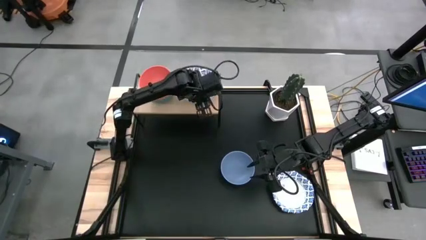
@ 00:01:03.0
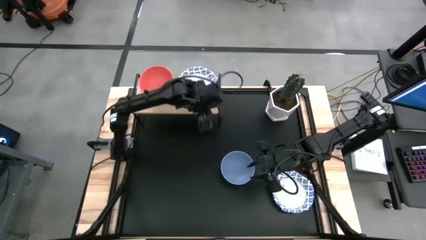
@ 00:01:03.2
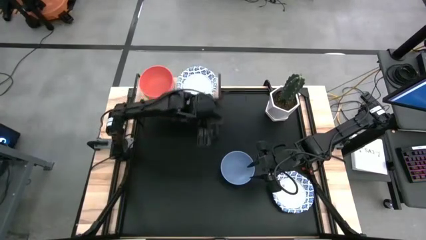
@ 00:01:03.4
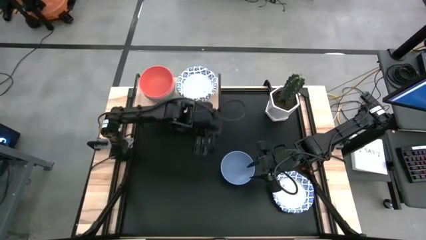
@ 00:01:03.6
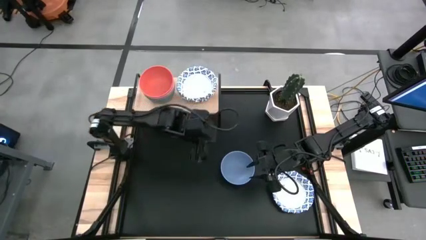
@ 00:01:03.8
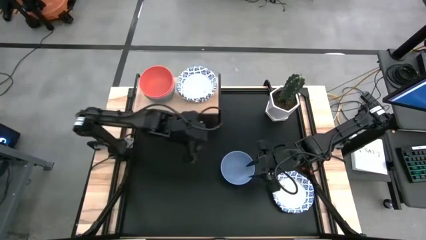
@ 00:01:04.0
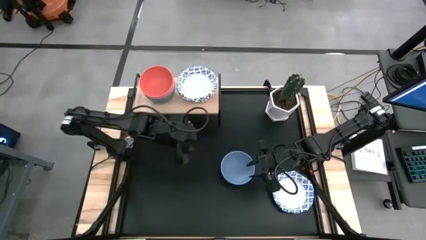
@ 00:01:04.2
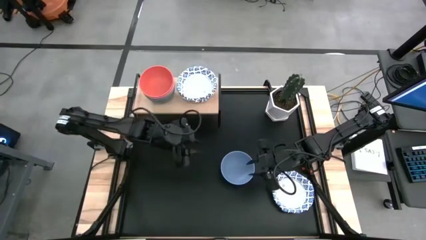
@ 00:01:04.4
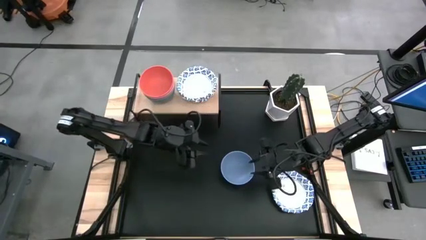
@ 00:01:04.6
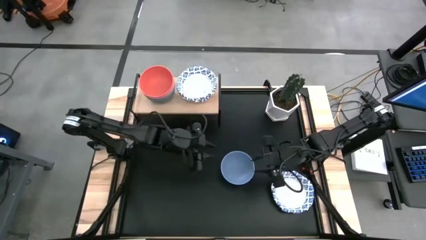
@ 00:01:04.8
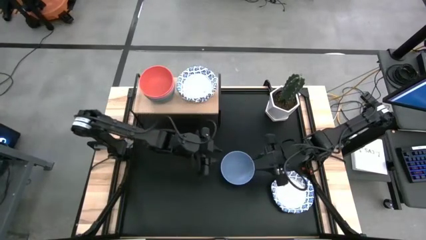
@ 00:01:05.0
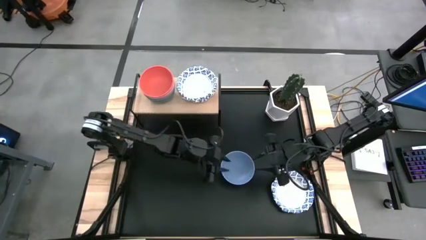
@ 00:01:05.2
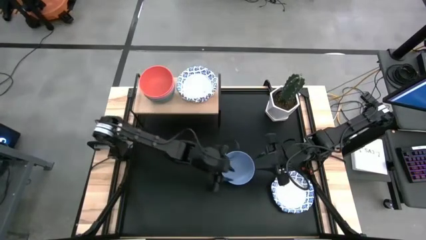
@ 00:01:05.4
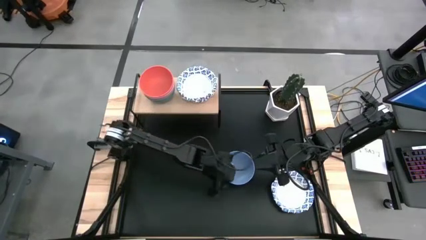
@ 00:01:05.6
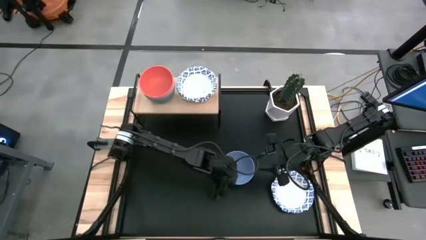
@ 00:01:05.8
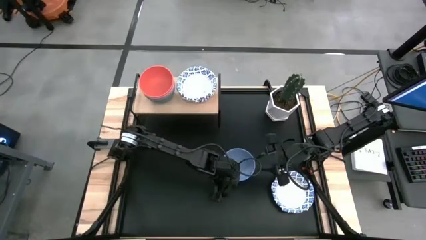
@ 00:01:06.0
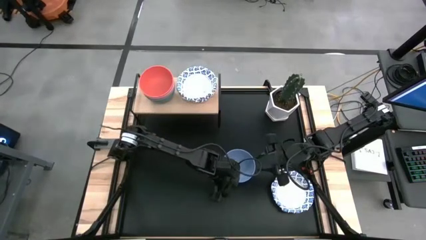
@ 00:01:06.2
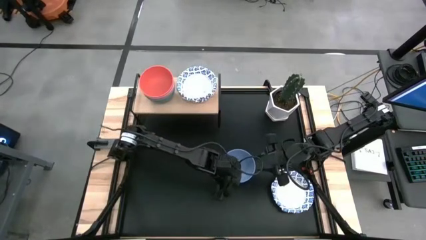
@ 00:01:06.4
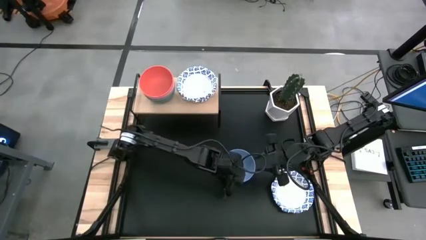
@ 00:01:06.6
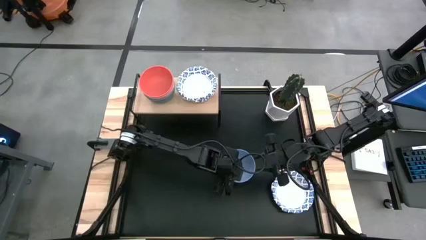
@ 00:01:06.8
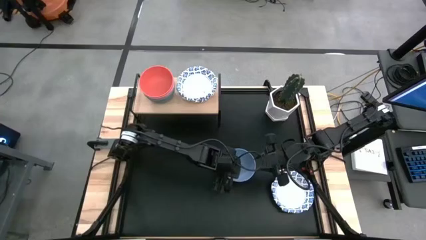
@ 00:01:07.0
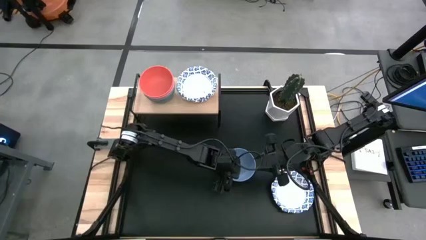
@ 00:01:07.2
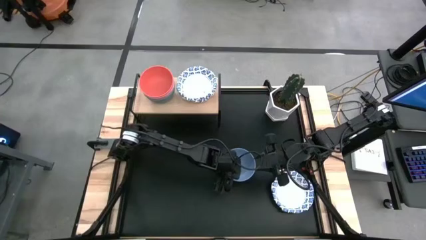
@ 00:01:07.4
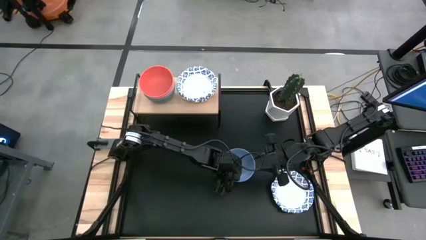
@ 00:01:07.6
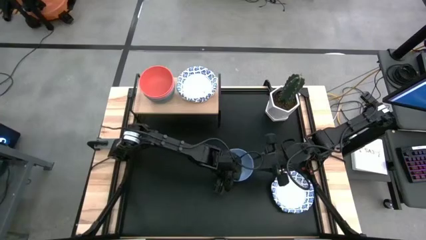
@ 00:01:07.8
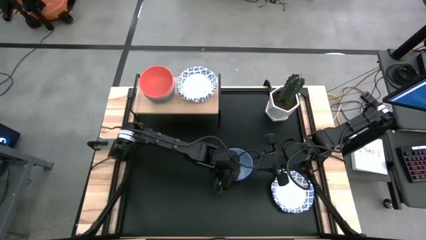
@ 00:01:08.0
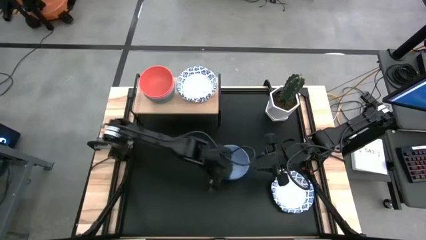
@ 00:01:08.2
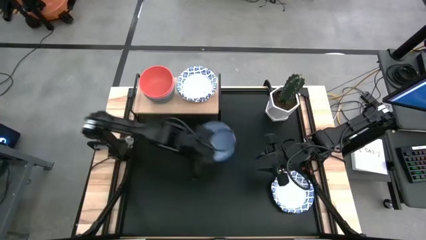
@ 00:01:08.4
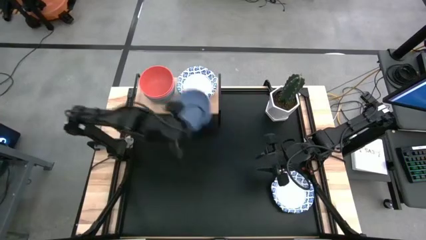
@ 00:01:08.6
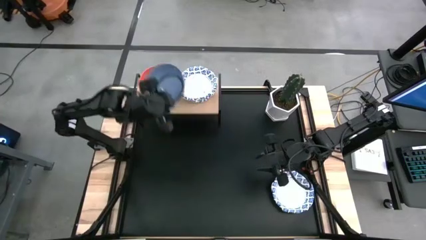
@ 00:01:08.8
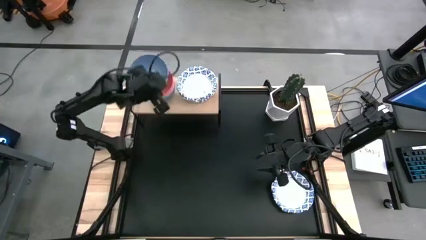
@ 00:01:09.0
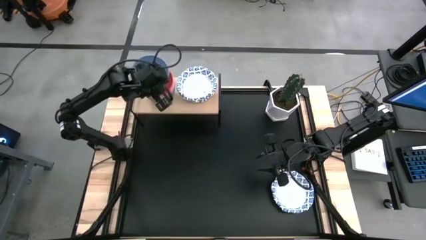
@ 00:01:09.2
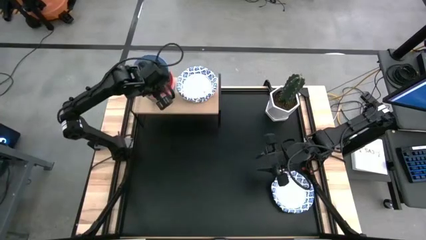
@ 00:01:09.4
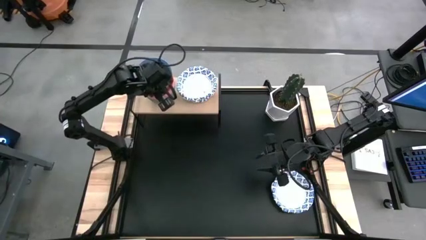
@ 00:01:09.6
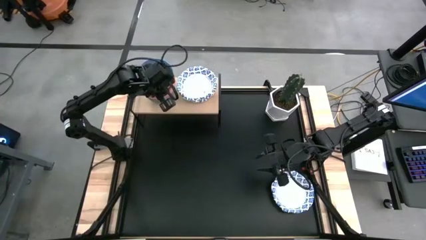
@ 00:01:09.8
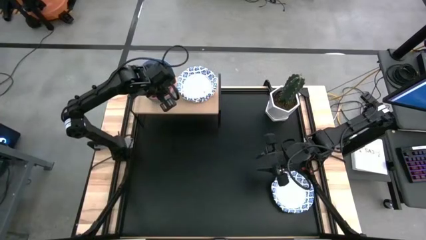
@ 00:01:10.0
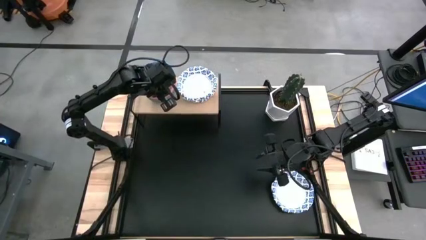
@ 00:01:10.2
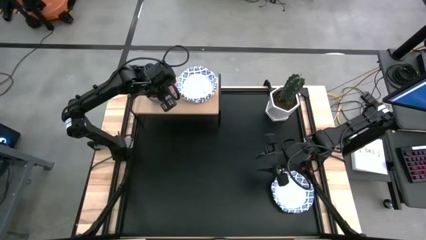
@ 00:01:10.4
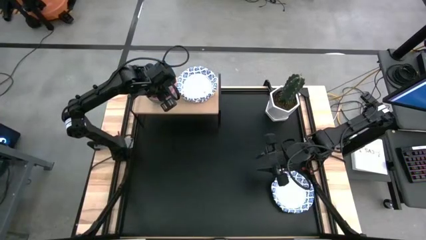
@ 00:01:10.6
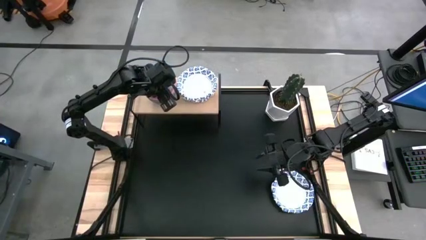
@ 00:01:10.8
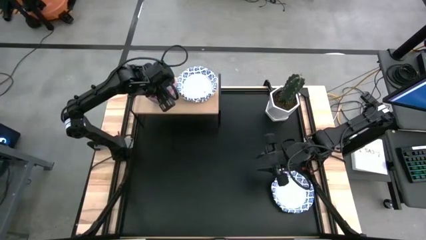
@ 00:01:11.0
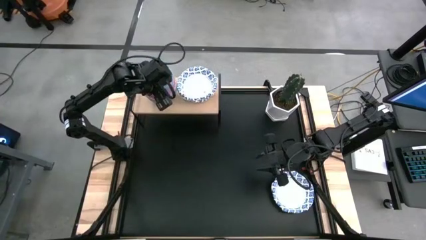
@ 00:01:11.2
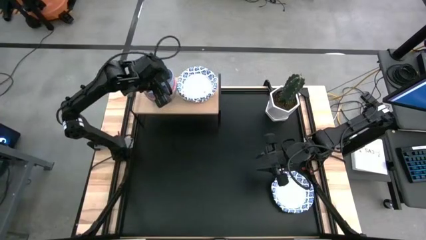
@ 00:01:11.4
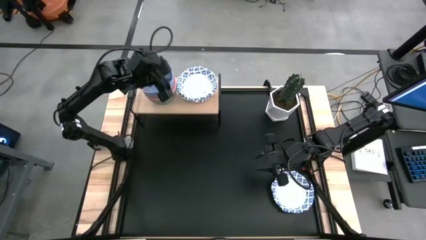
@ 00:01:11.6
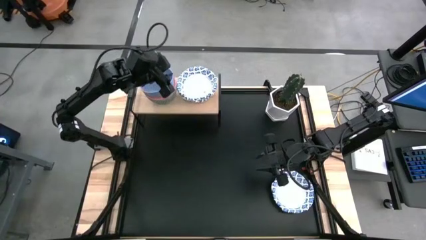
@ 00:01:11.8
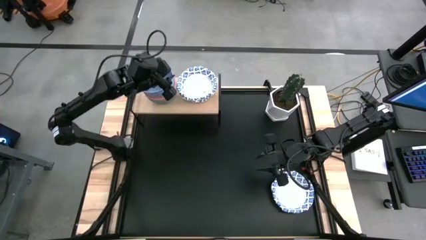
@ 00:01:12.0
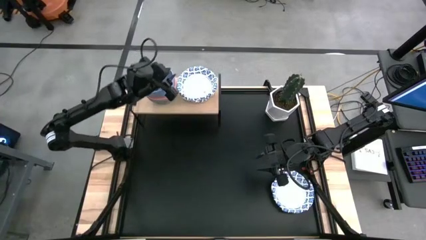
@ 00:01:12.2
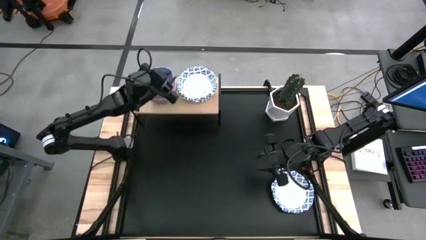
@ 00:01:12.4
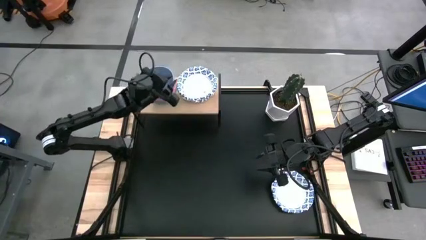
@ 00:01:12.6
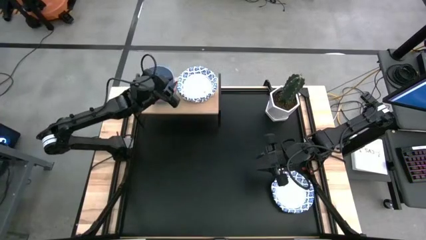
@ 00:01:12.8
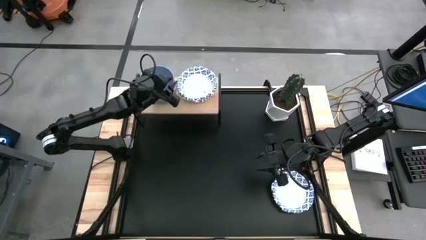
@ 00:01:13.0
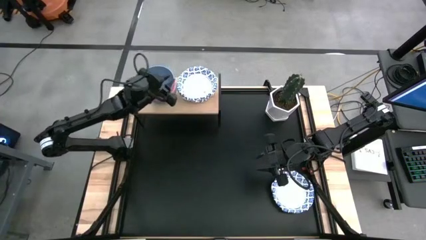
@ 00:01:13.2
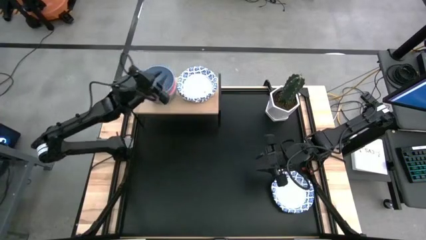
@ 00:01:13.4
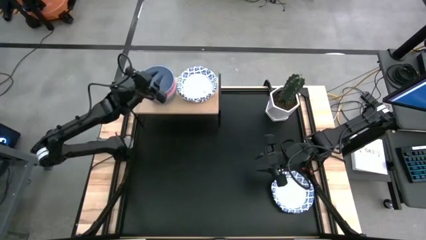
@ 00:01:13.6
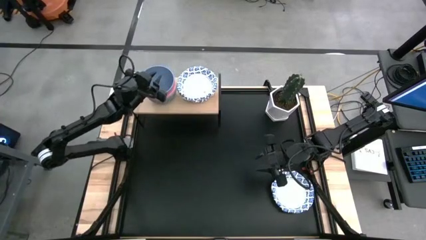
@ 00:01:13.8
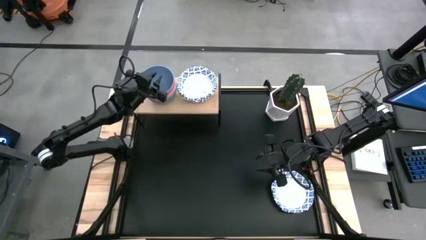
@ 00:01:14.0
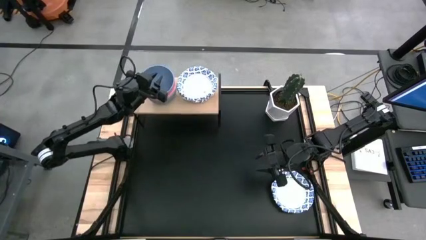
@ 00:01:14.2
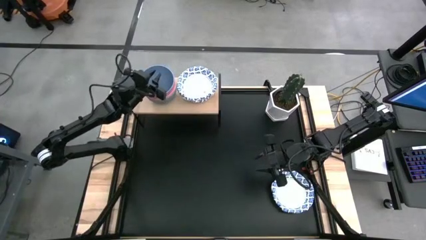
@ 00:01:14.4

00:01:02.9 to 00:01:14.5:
Task: Place and stack bowls onto a shelf
Stack the light blue bowl on top of the orange bowl on the shelf

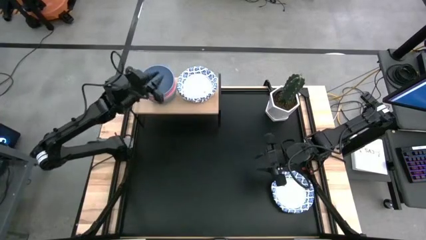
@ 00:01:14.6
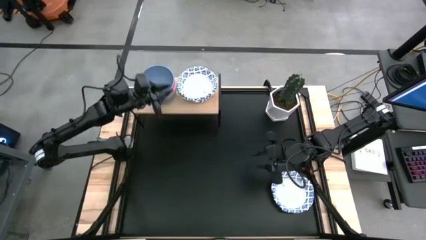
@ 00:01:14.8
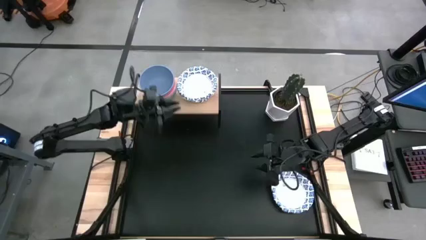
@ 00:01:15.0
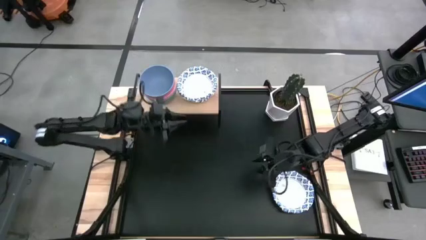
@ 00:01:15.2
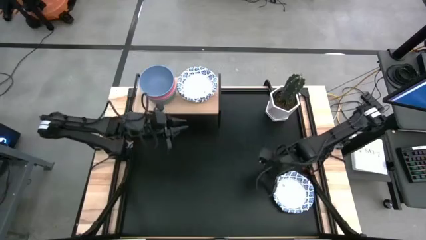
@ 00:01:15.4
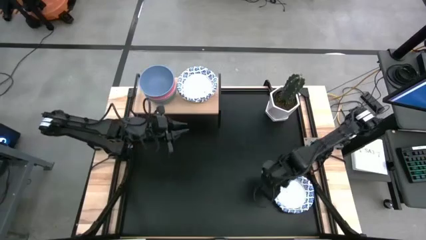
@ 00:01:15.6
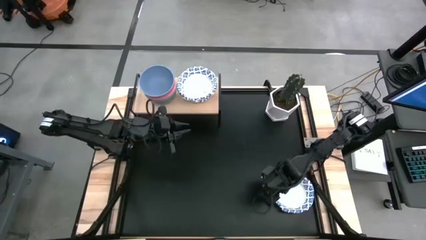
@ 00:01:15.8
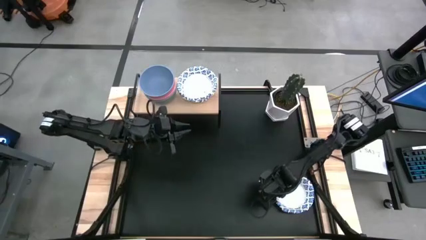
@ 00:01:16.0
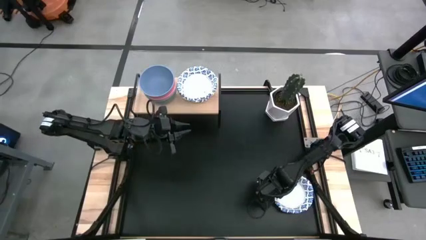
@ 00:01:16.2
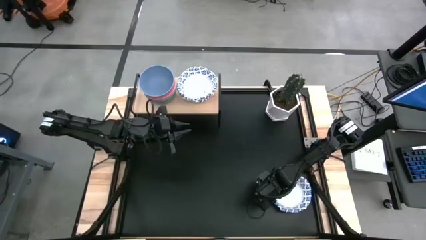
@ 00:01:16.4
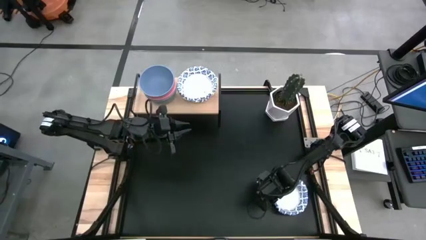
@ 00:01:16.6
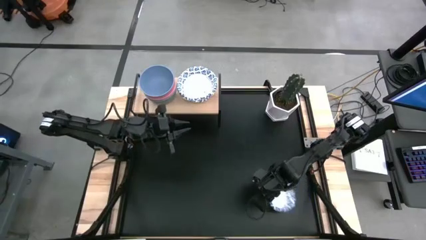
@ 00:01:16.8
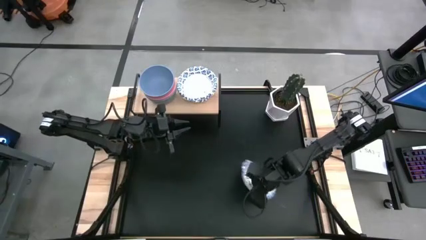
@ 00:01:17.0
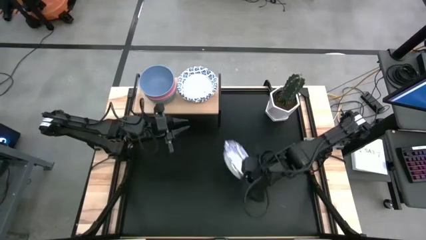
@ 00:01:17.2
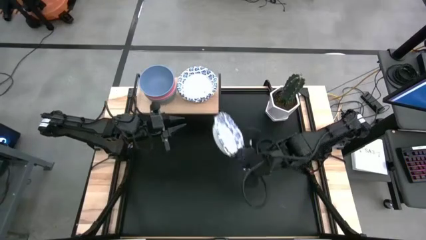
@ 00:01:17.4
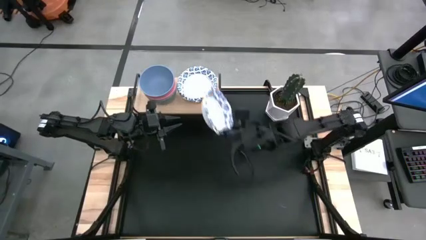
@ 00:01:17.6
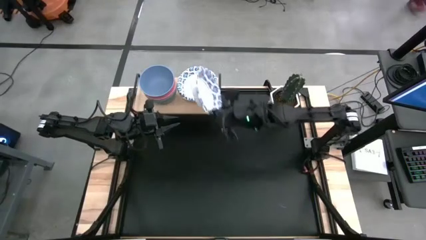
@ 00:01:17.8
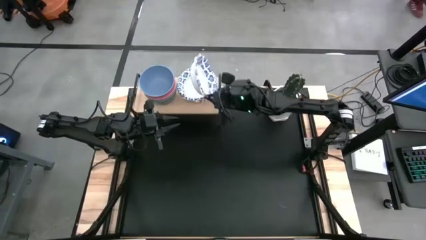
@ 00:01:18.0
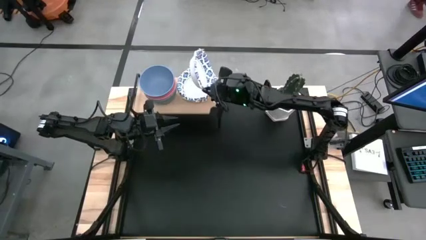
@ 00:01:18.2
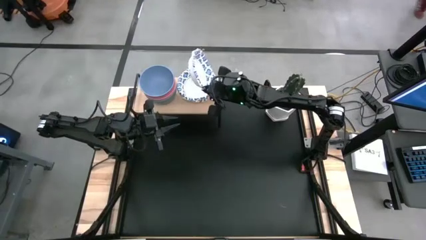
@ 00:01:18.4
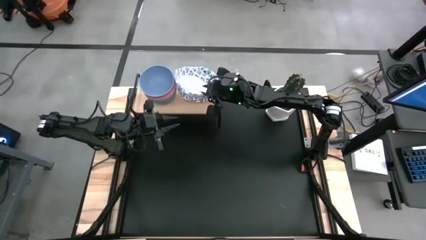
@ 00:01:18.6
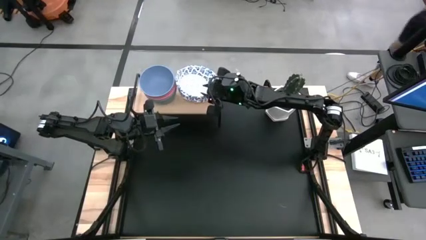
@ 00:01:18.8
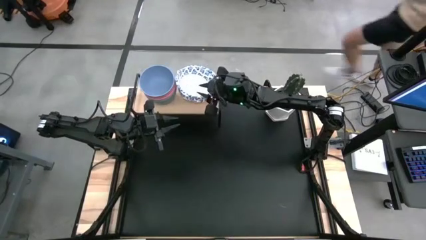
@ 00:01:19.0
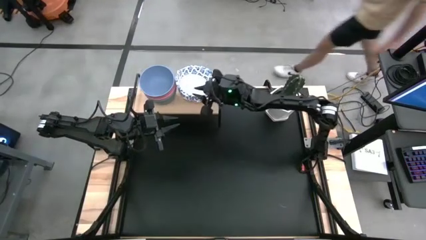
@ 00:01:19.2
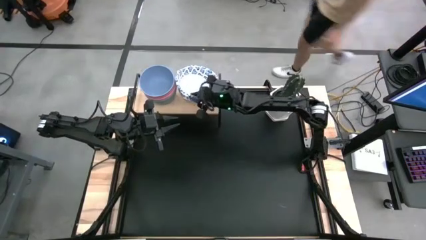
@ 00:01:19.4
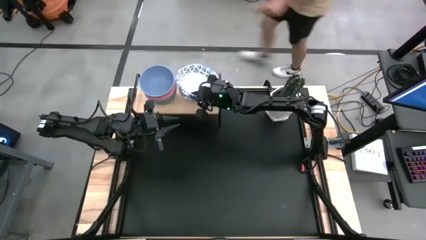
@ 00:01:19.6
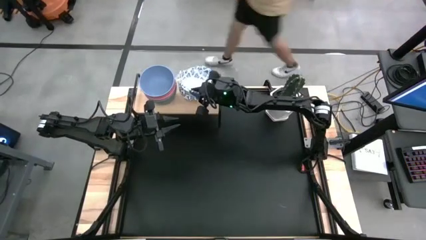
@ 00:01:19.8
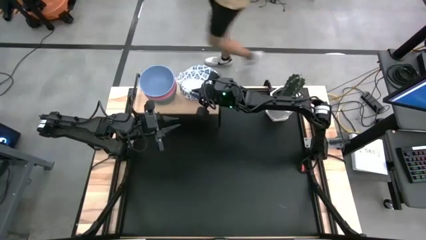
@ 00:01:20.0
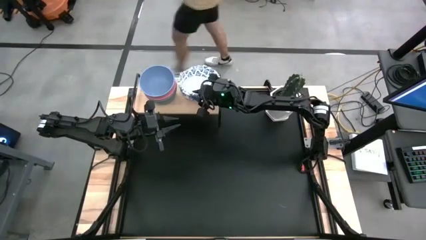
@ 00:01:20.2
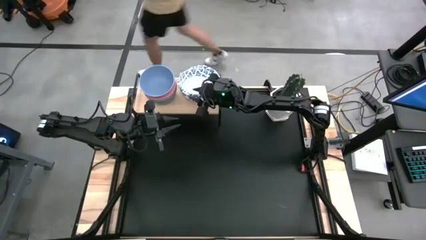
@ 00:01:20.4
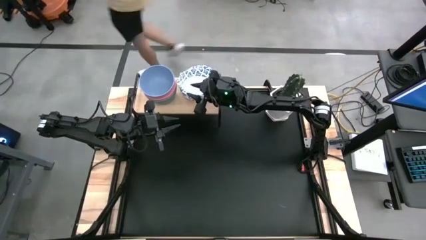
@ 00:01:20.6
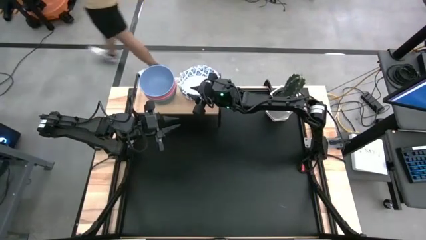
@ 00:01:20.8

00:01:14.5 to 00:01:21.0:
Stack the white patterned plate on top of the white patterned plate on the shelf
